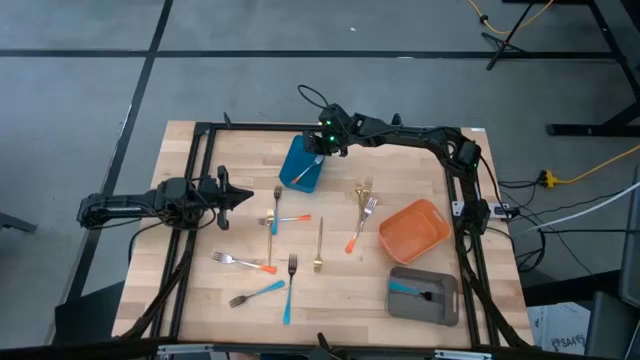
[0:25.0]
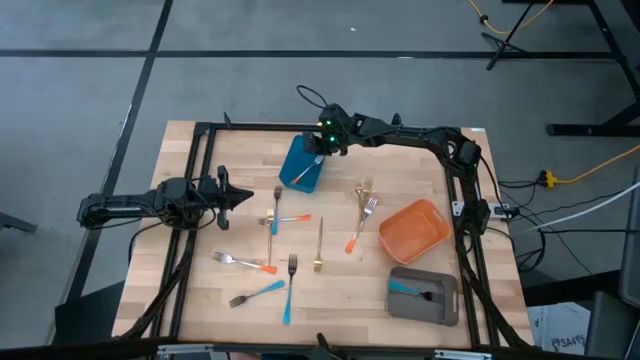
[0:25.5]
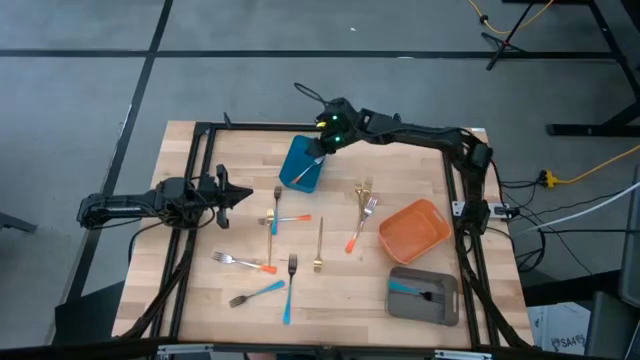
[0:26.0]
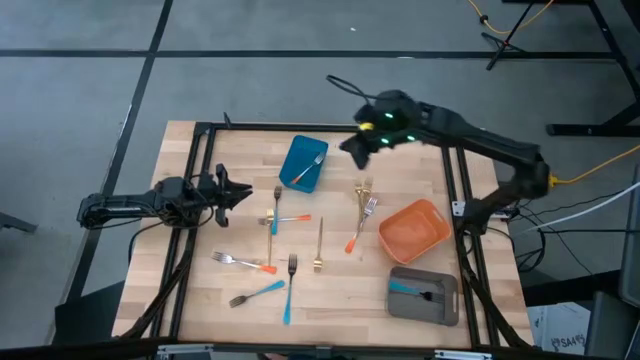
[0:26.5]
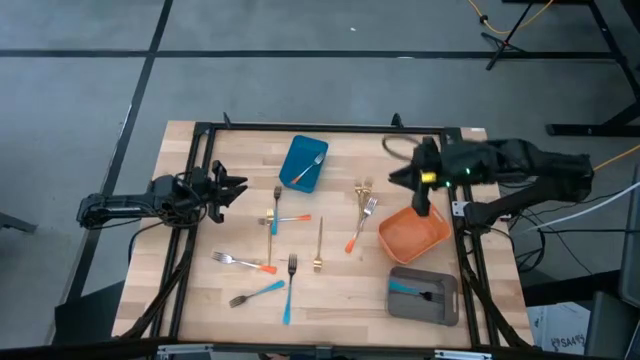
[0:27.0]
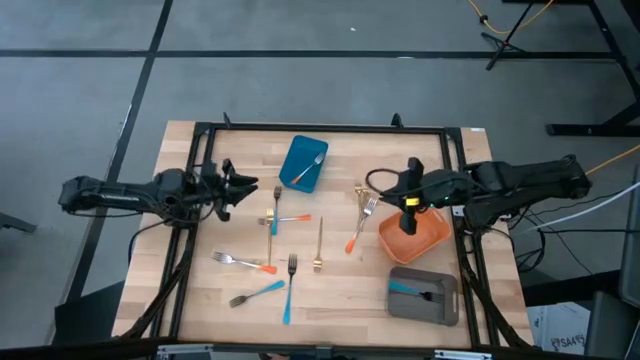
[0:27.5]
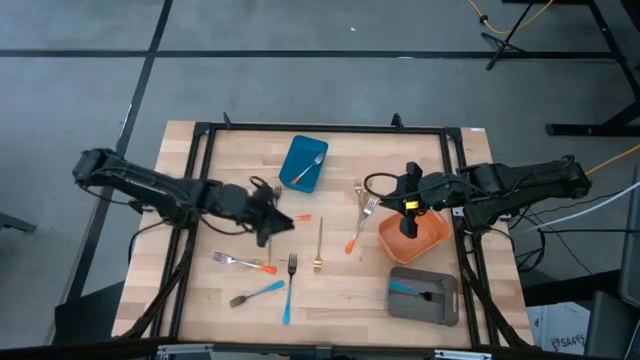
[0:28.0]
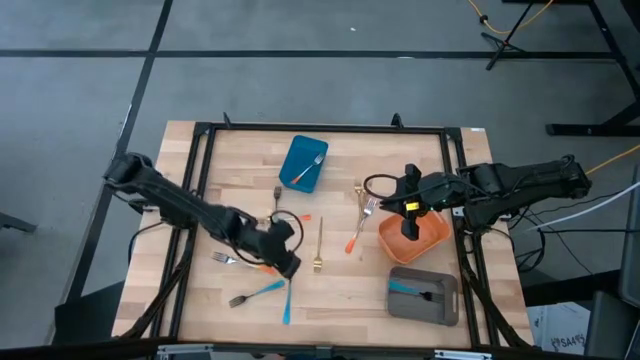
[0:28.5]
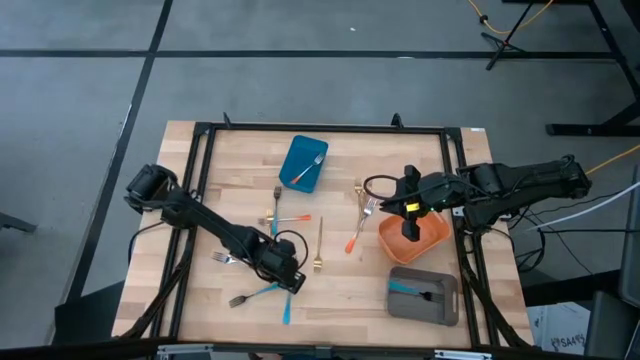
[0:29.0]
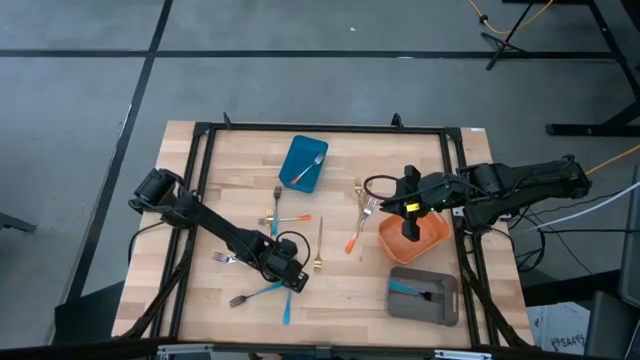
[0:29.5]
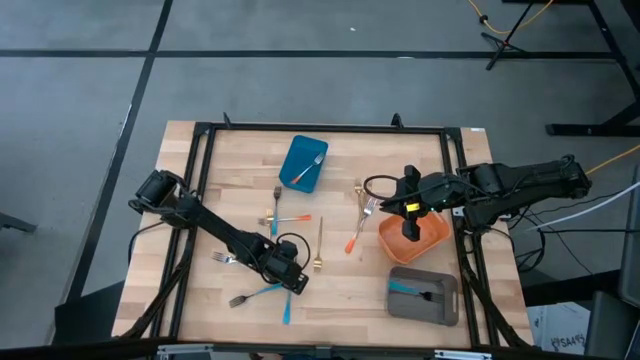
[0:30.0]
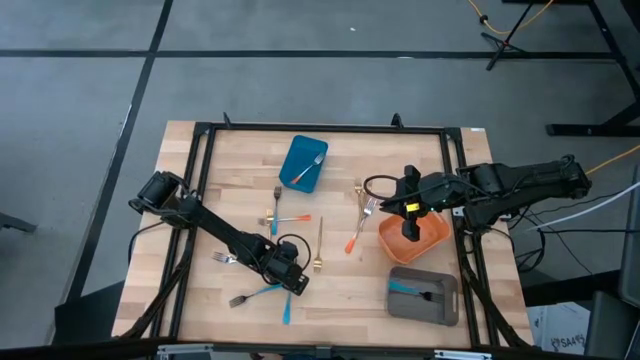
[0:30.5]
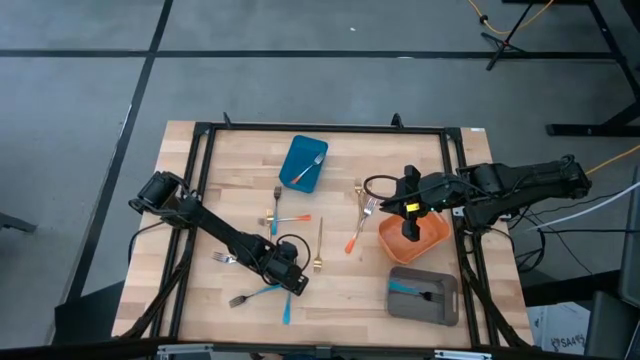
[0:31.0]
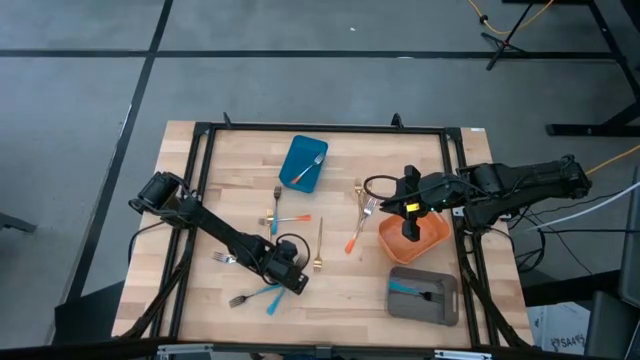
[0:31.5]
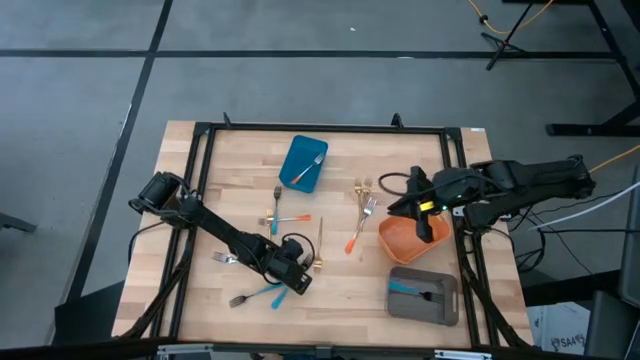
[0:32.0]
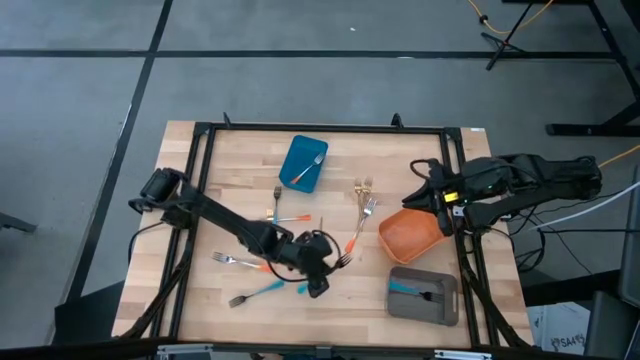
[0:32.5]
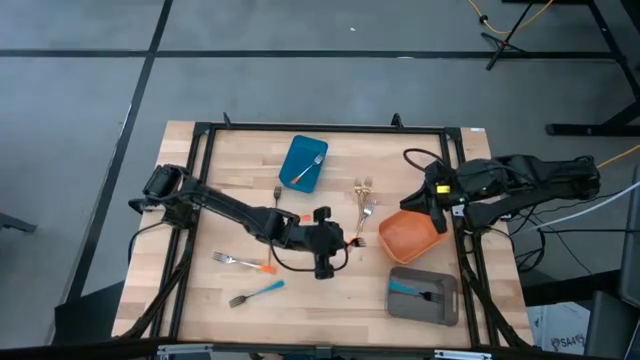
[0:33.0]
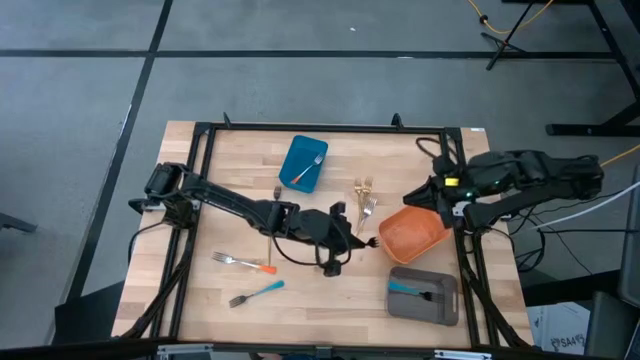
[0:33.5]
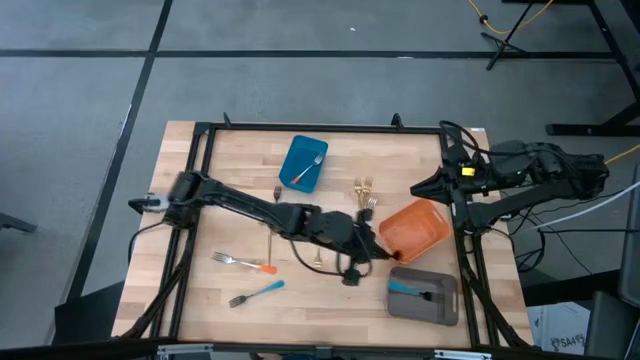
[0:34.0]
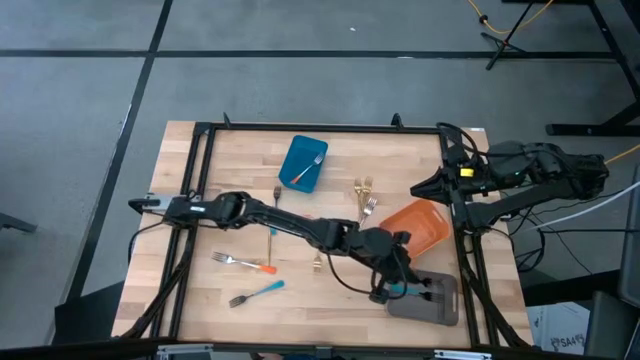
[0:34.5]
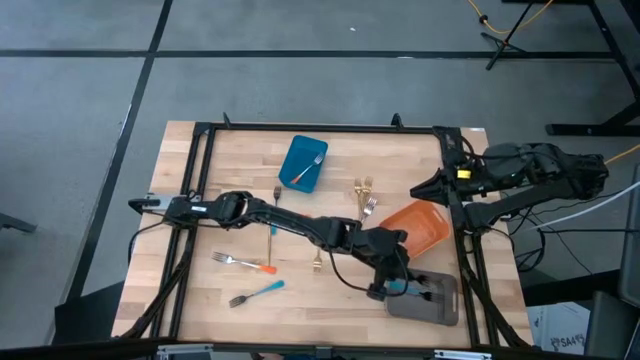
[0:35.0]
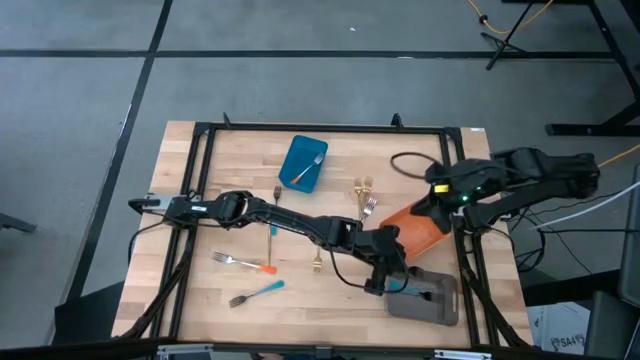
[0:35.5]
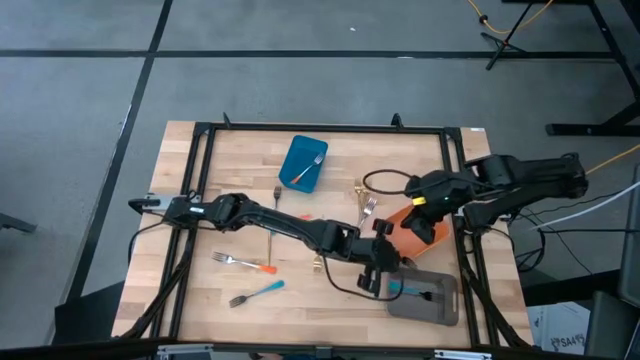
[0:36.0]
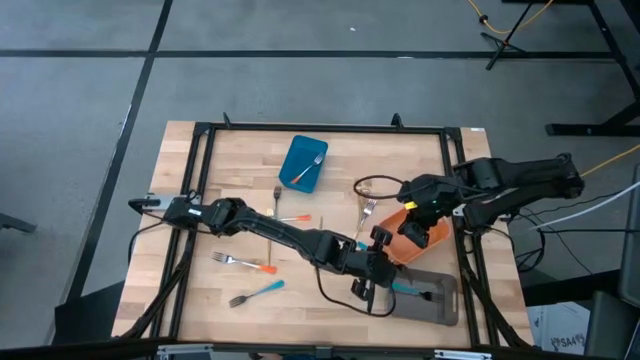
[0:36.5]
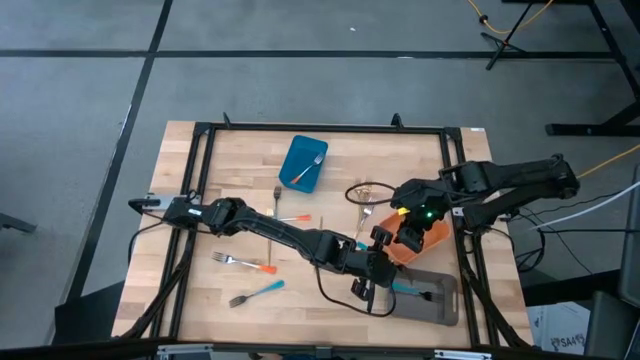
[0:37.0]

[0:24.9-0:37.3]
Task: Sort silverware by color (type)
Put the right blue fork into the black bin

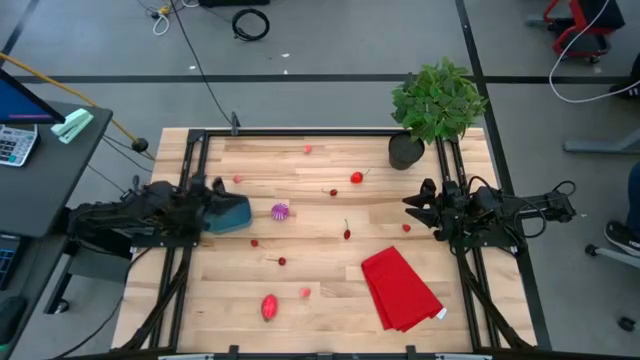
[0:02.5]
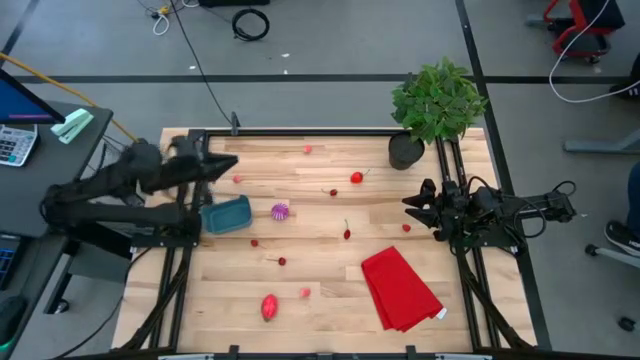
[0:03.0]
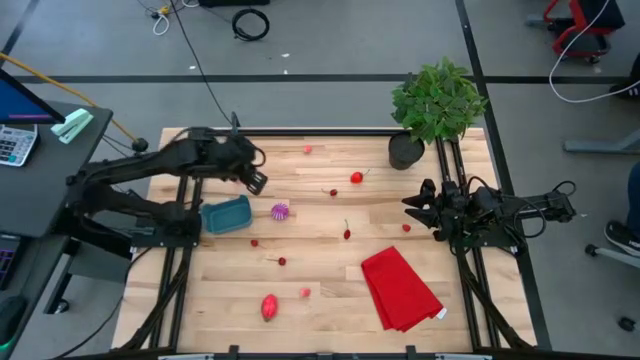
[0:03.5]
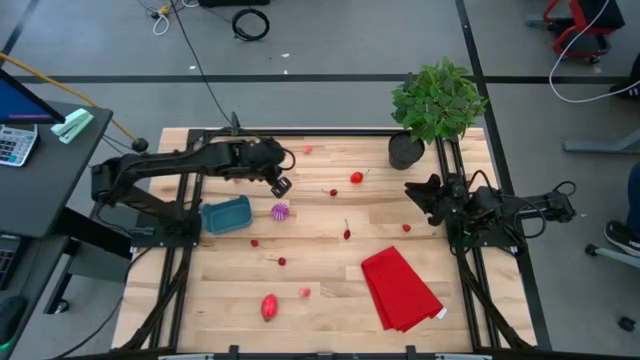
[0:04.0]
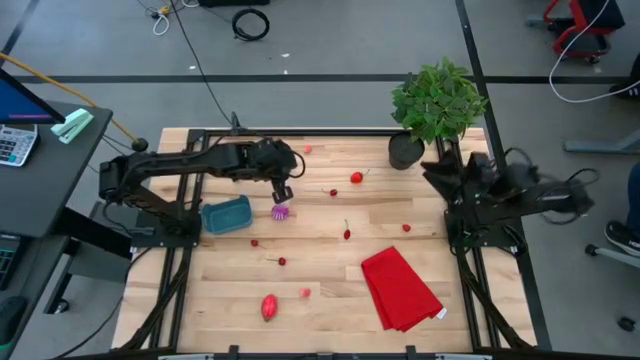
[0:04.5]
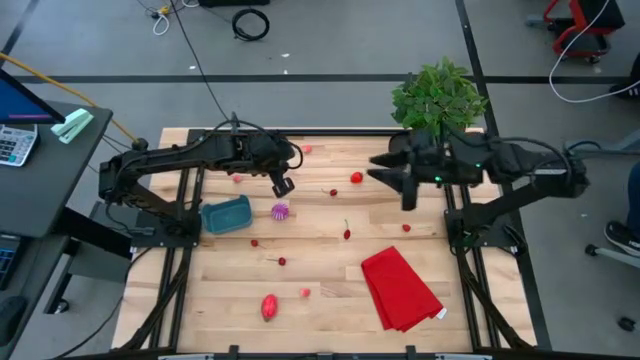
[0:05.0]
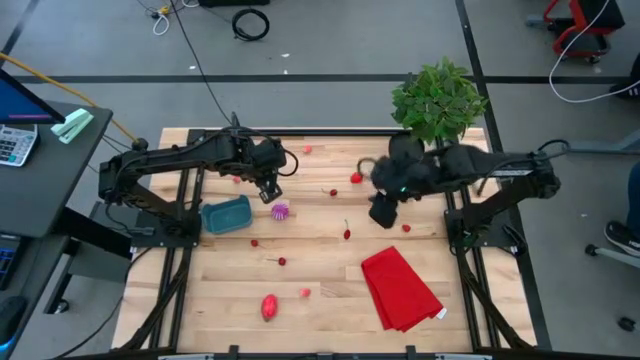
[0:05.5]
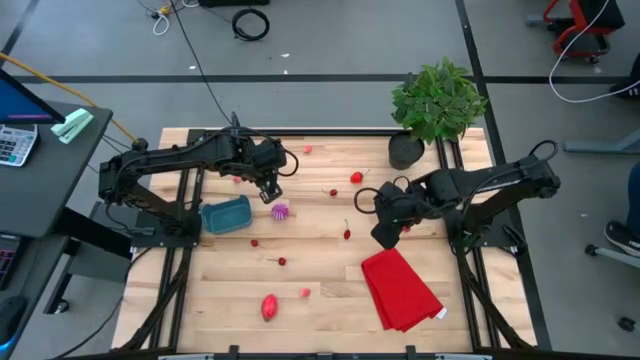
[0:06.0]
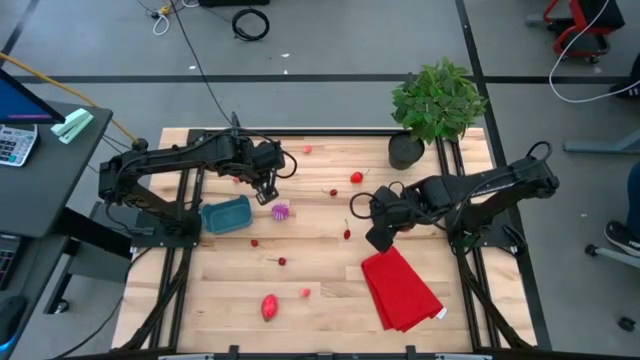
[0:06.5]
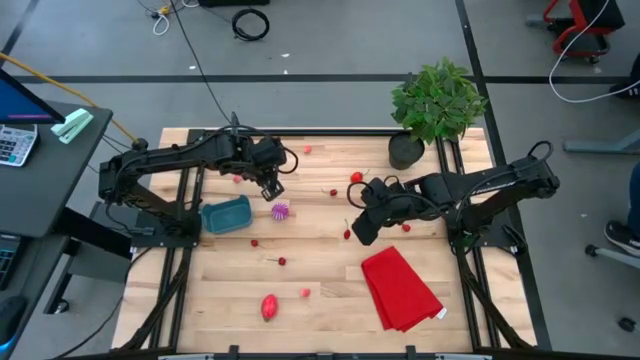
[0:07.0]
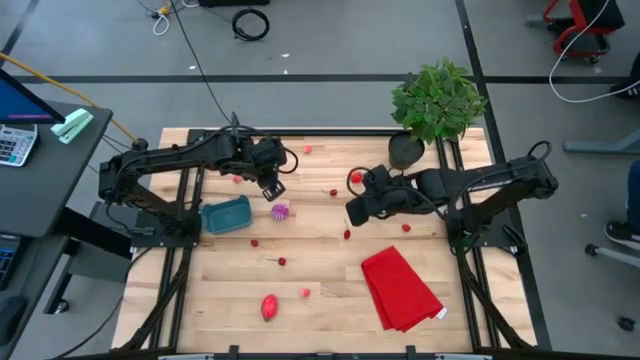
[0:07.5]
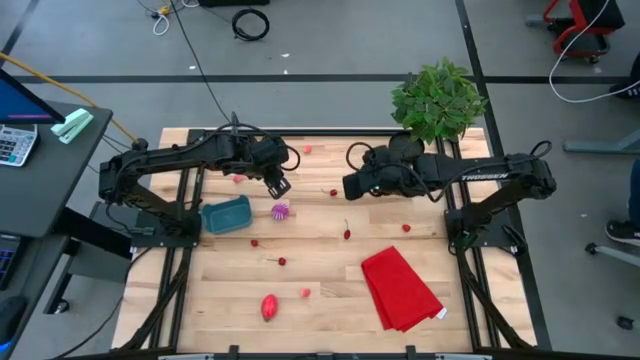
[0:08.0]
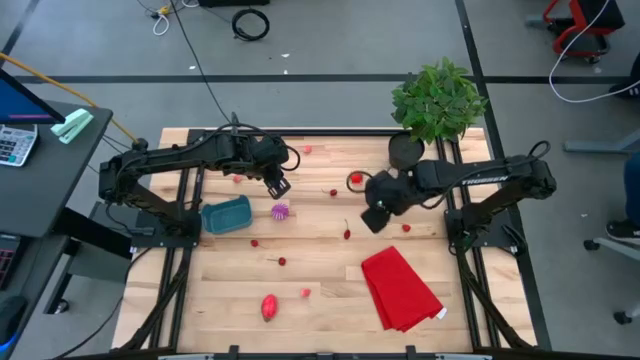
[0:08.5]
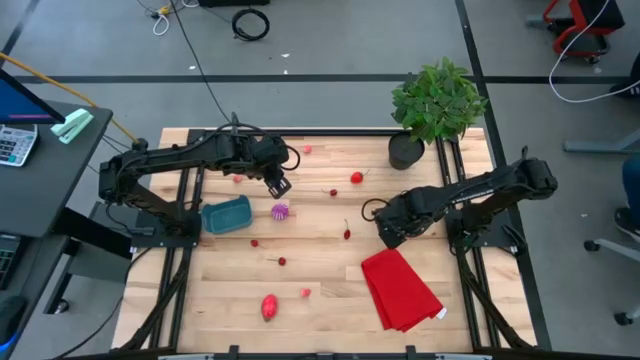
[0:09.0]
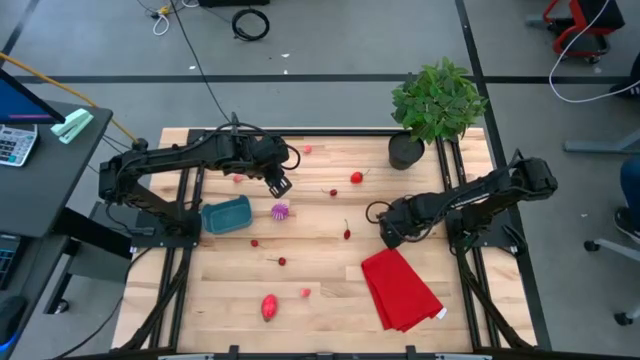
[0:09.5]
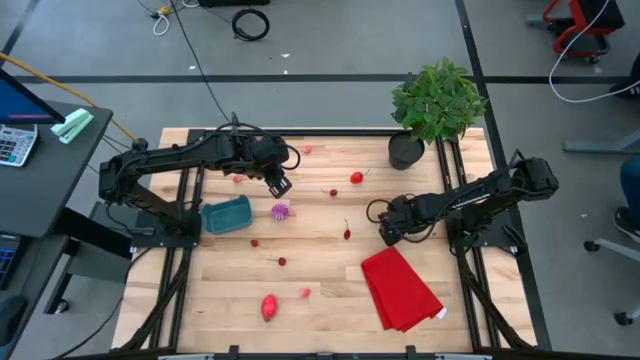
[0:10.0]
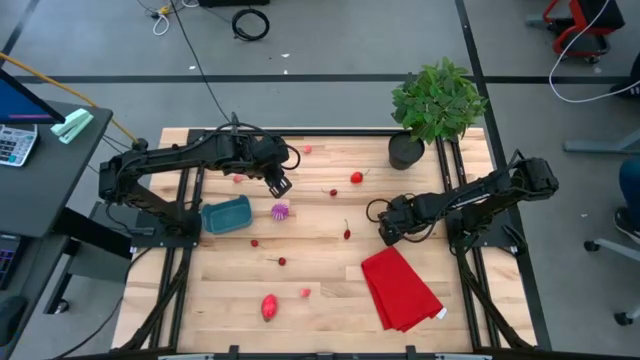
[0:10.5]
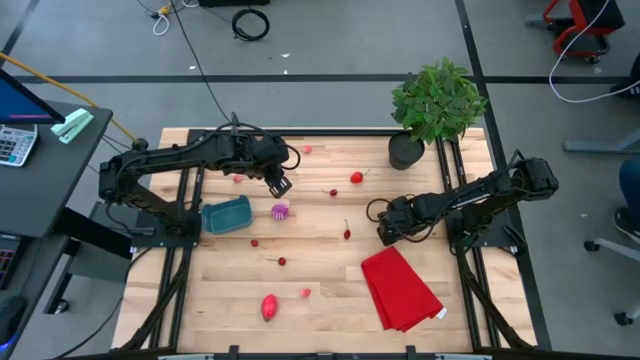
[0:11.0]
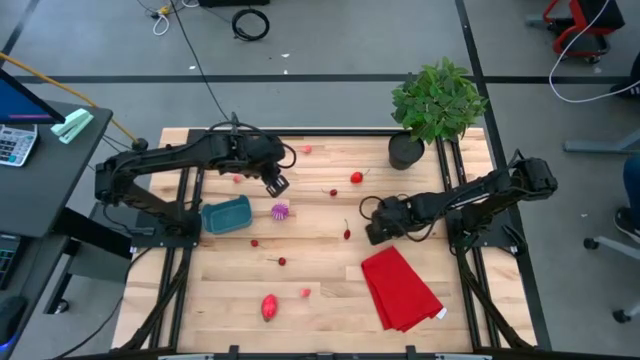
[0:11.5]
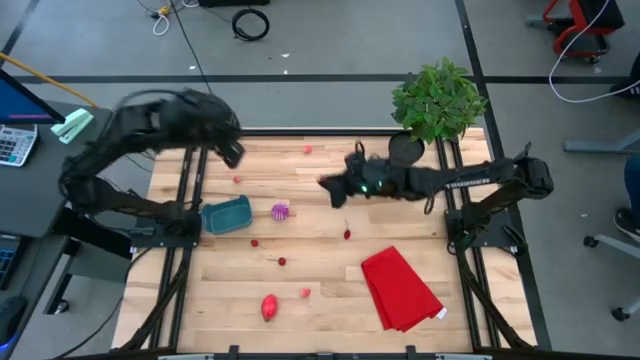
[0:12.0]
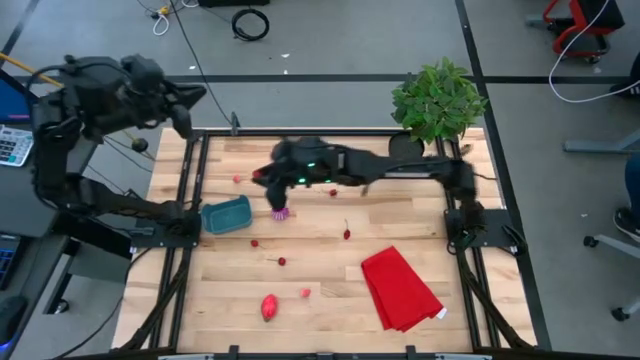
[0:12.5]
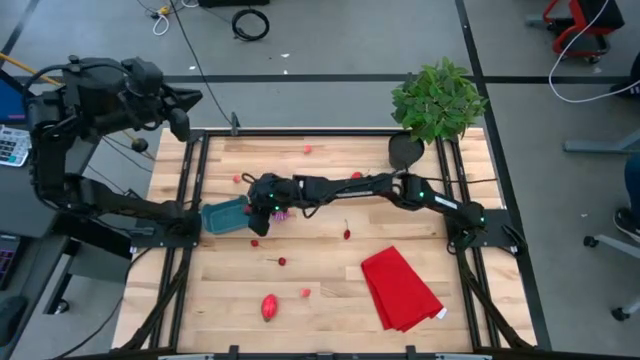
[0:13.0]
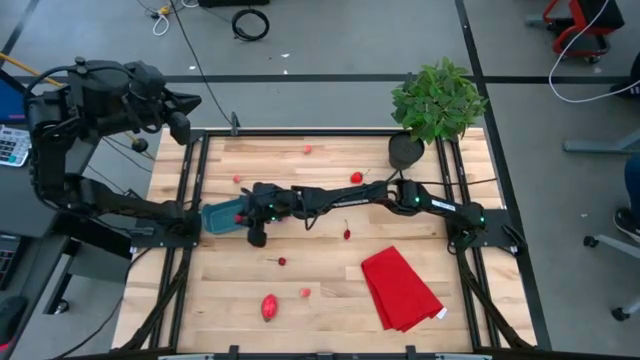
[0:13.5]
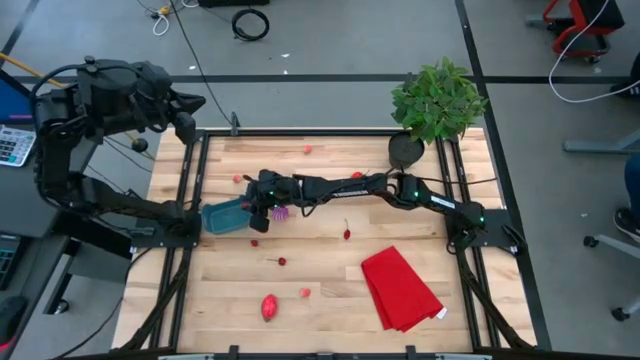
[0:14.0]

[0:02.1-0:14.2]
Task: Pick and placing Produce into tupperware
Put the red raspberry into the blue bin
